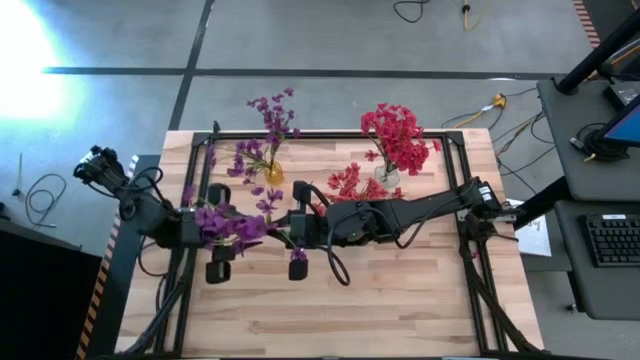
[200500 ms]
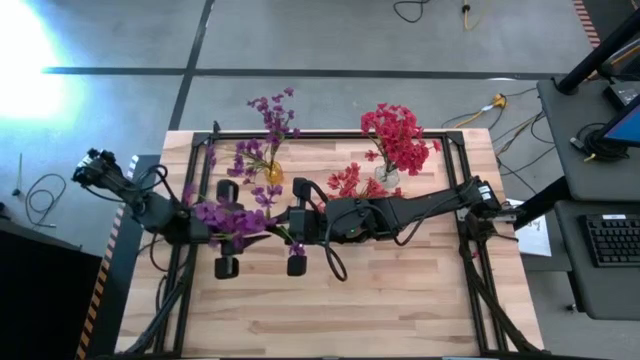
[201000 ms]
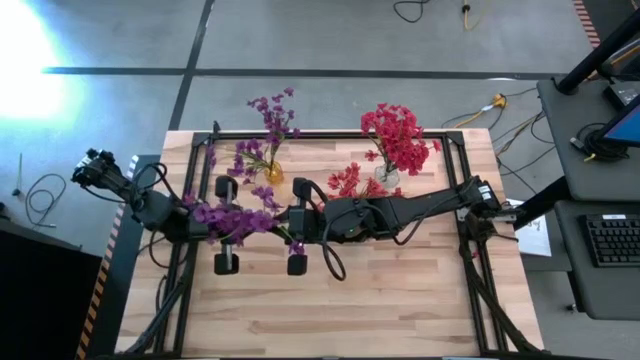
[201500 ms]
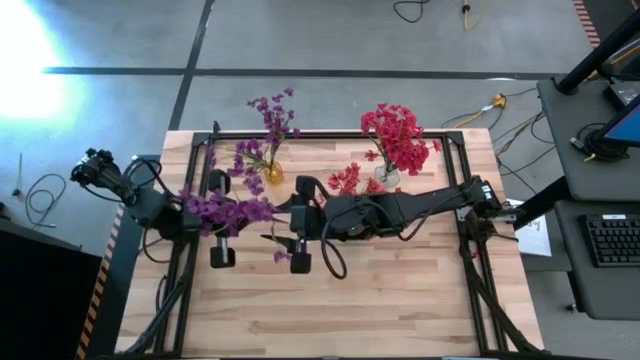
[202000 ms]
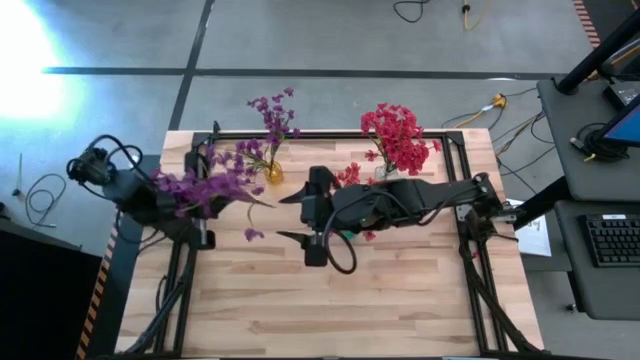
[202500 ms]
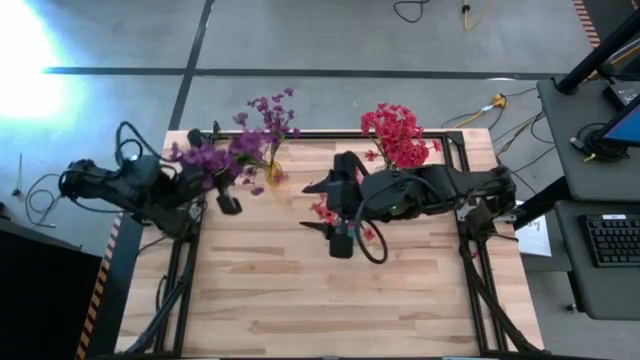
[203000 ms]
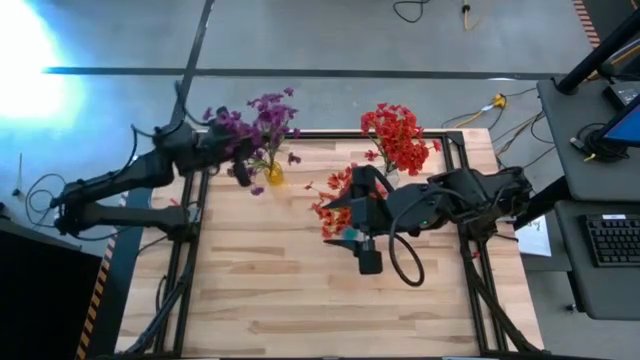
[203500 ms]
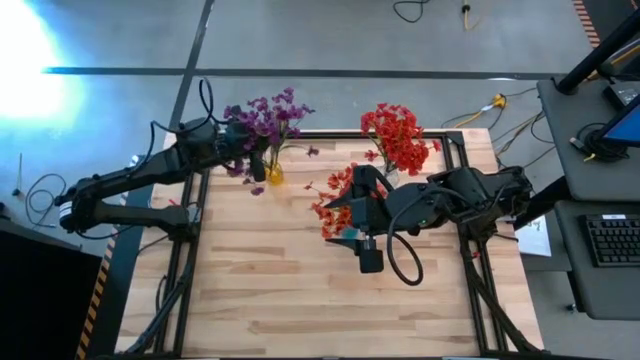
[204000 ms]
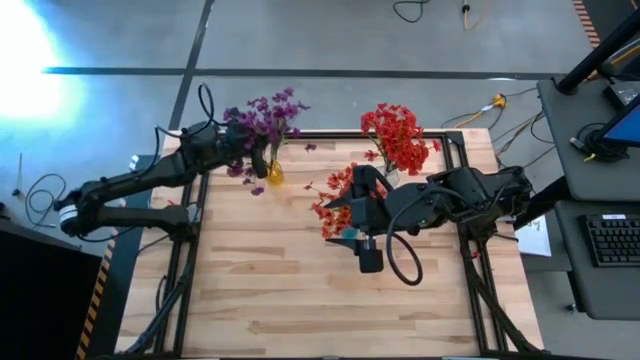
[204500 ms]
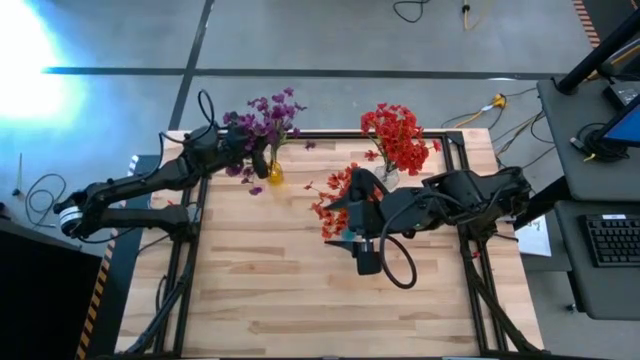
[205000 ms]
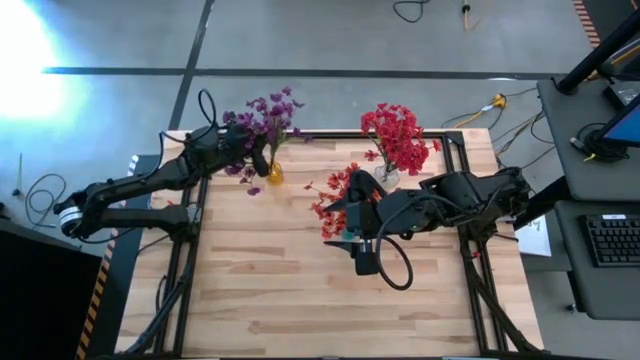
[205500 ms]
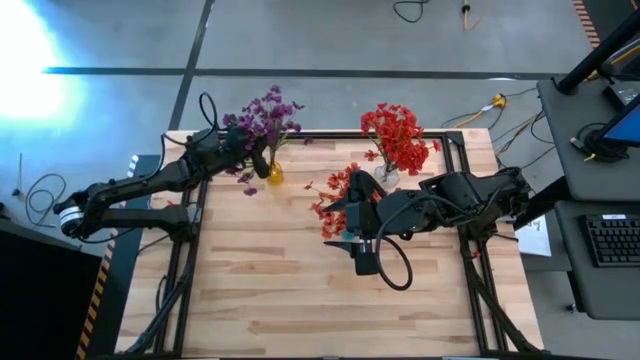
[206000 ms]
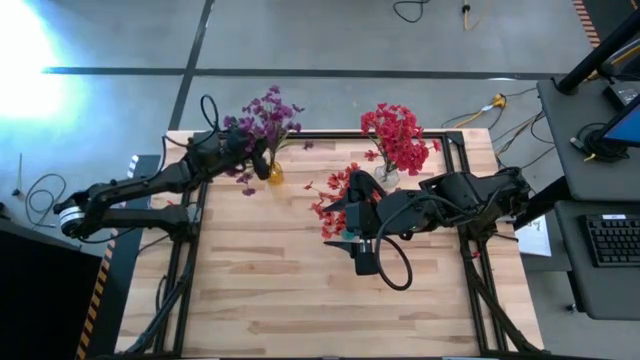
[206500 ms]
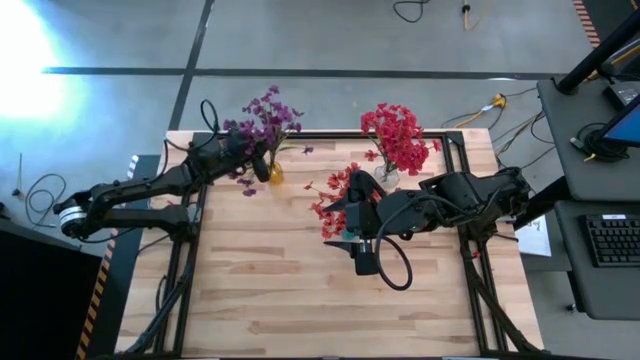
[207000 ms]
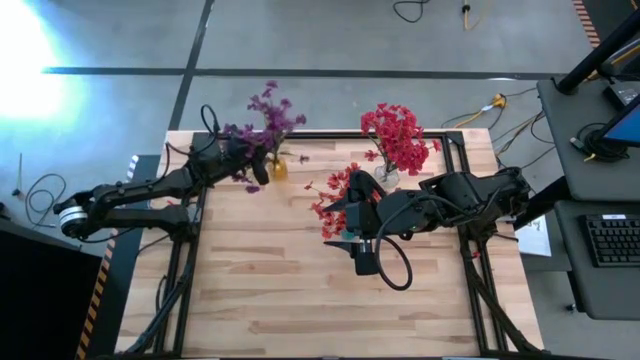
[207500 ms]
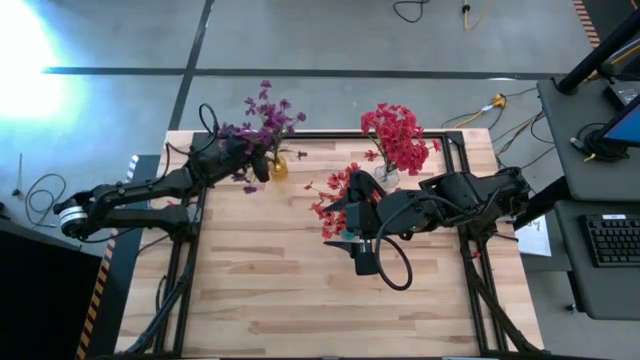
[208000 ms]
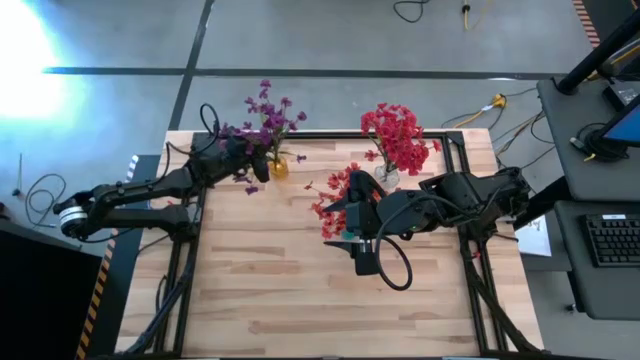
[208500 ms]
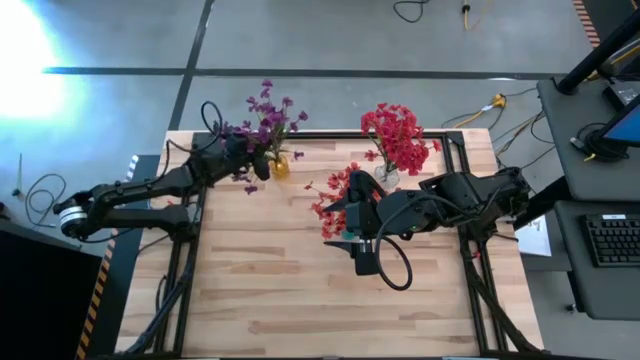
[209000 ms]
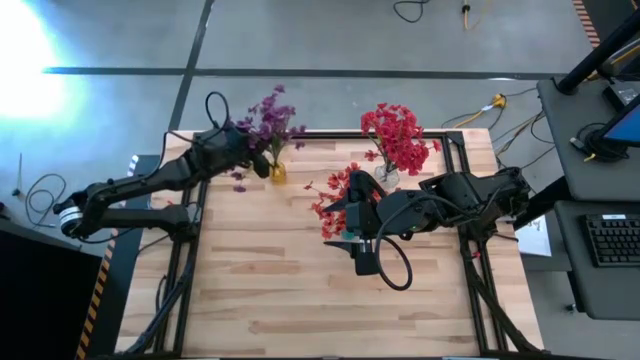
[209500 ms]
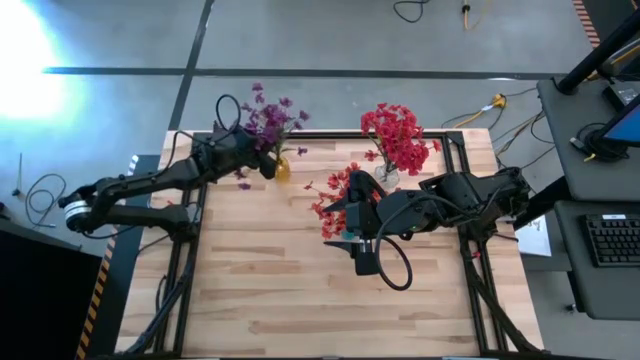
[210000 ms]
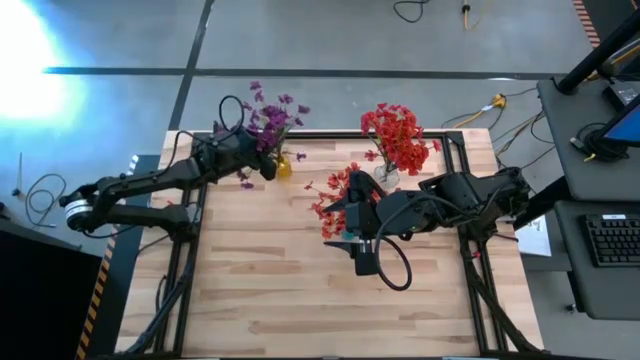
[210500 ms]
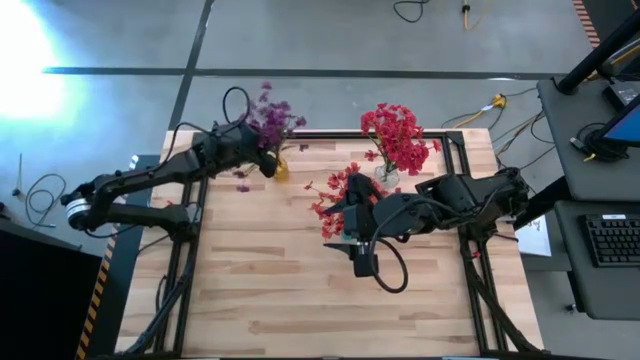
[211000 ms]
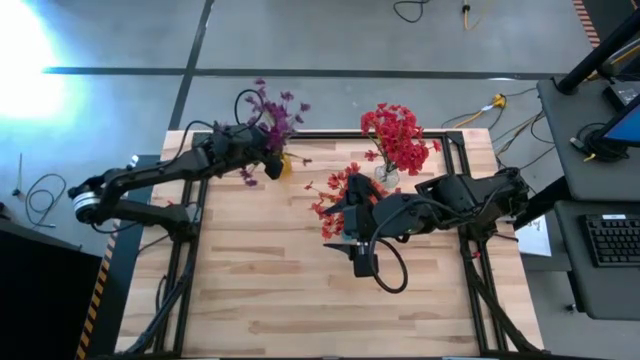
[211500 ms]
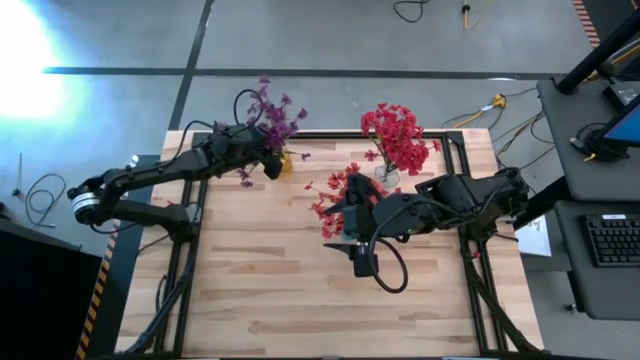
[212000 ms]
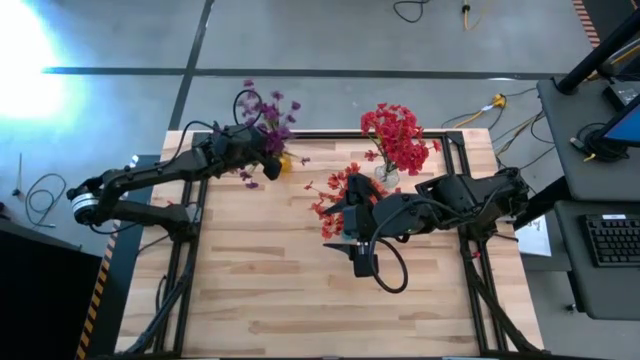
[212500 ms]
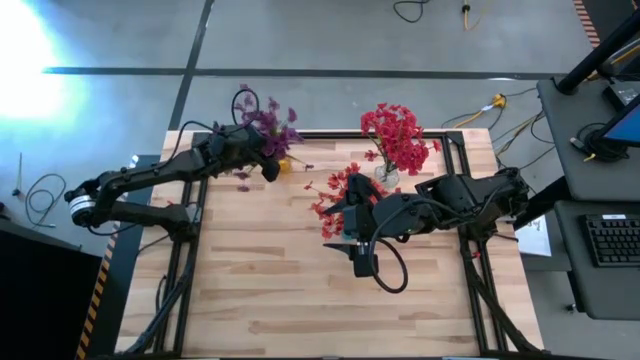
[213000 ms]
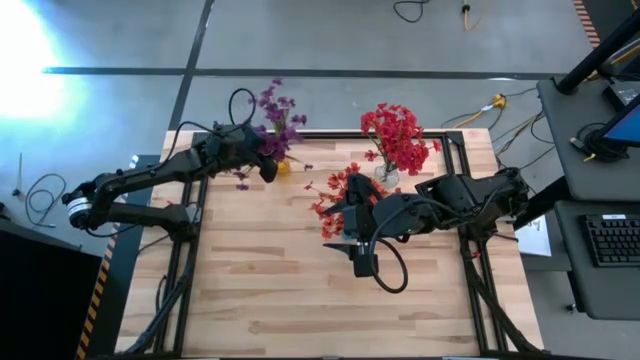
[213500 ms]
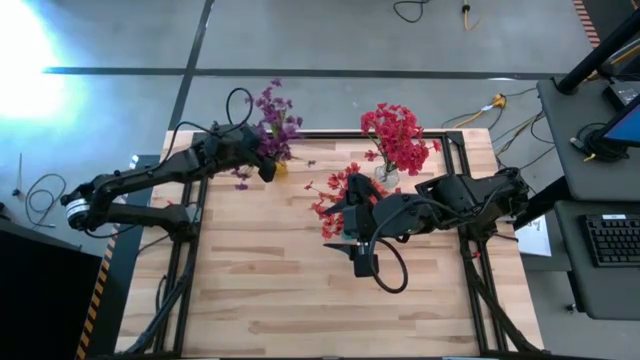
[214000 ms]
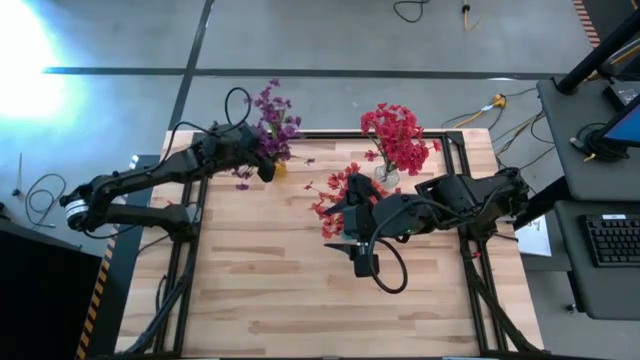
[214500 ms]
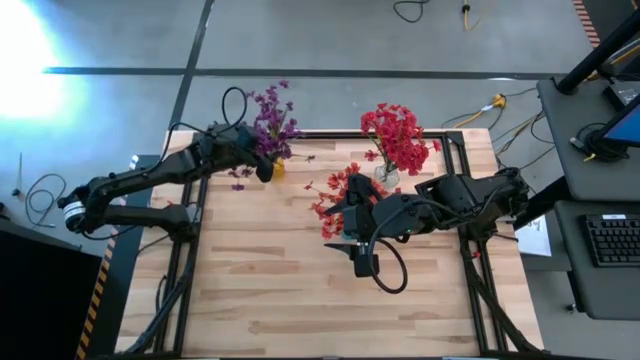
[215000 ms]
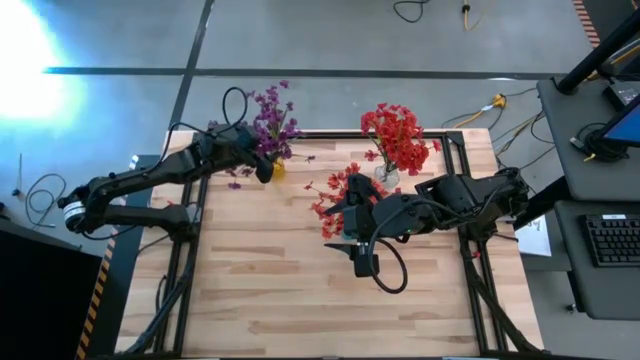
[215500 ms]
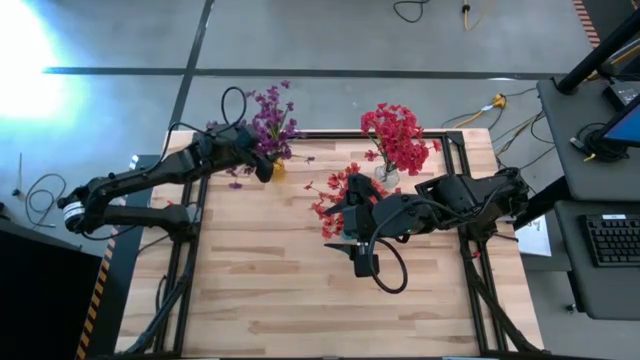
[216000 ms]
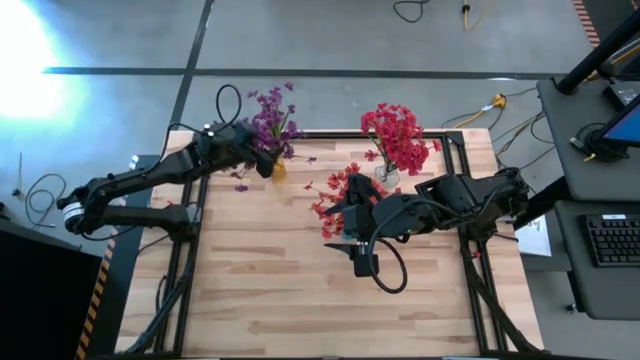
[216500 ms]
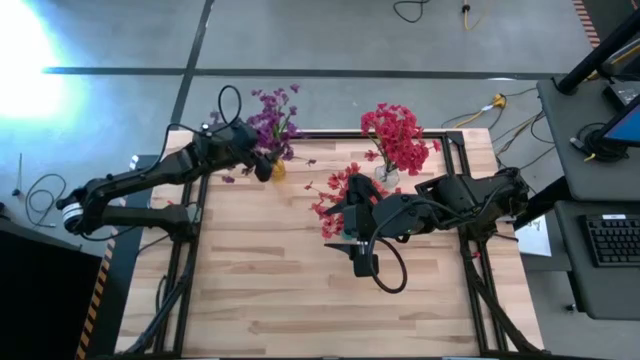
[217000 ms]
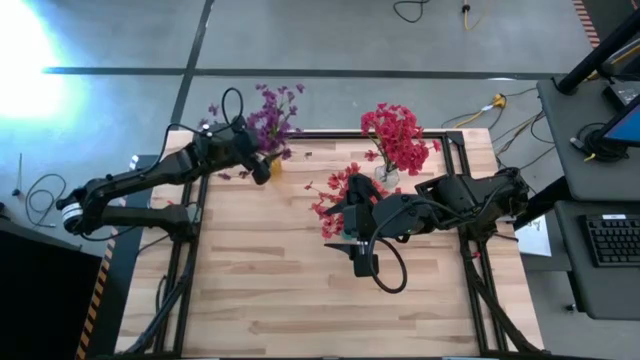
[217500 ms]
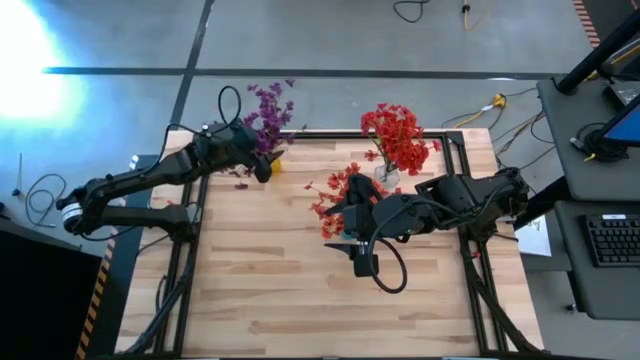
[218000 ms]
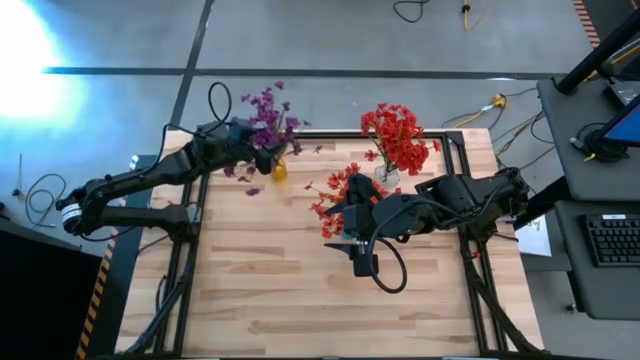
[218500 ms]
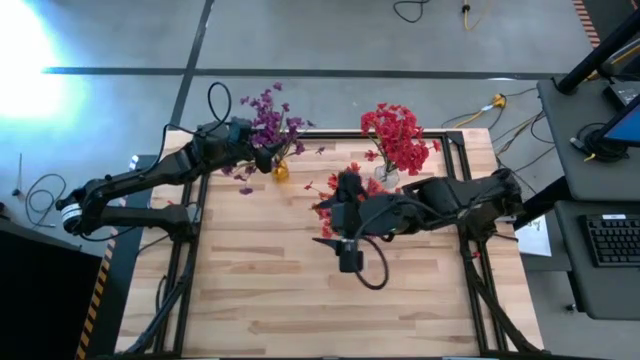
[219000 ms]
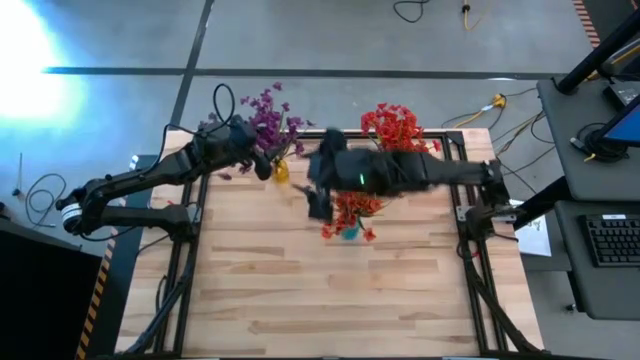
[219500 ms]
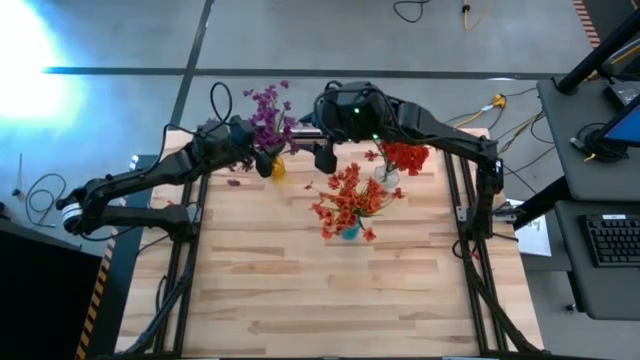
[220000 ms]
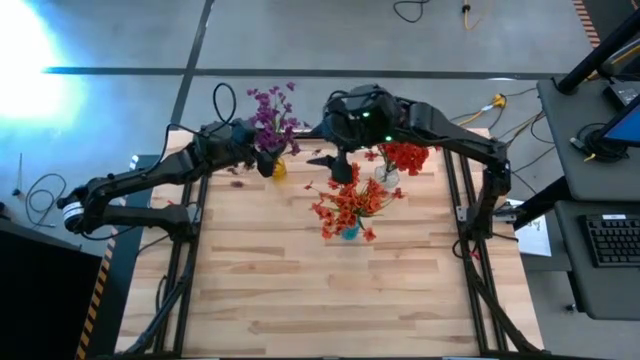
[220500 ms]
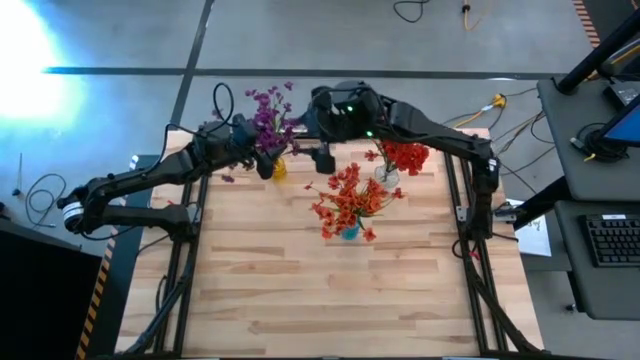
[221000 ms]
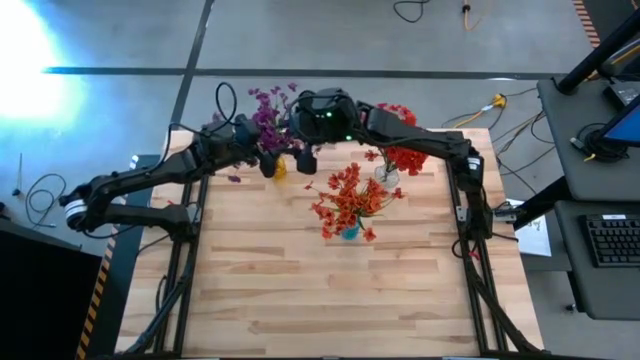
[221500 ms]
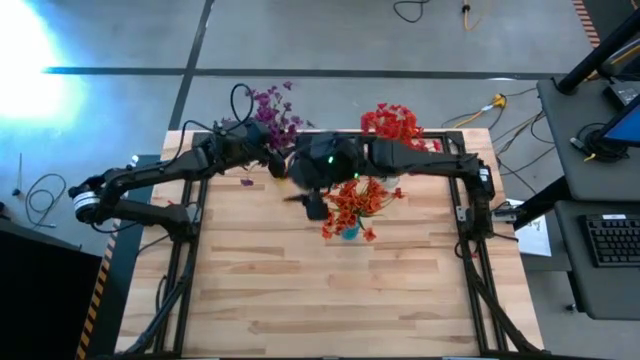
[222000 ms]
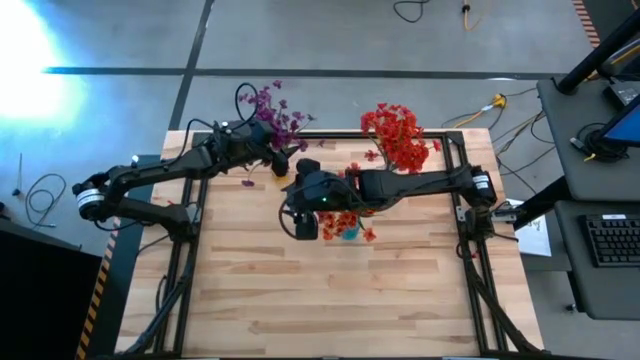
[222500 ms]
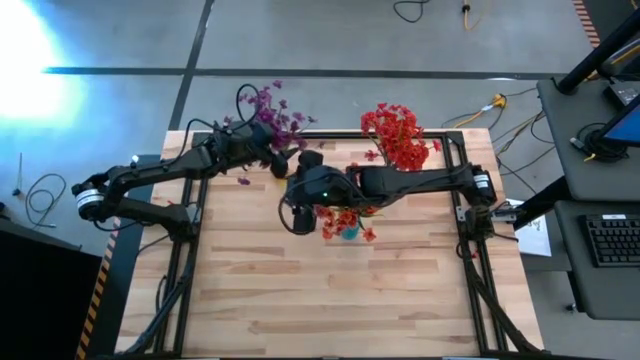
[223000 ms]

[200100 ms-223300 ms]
Task: Sort flowers into vase by color
Put the violet flowers into the yellow vase
